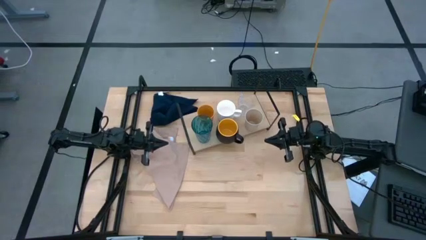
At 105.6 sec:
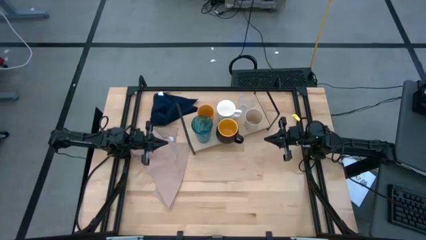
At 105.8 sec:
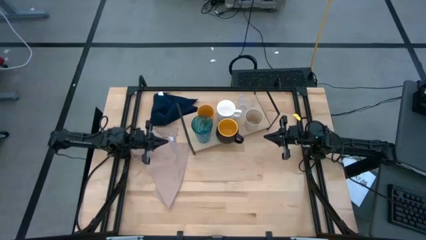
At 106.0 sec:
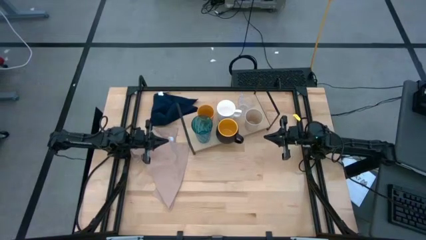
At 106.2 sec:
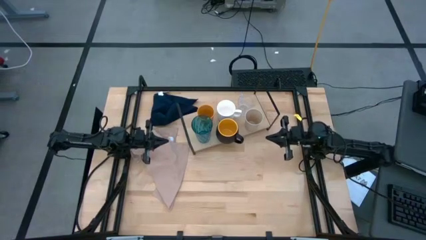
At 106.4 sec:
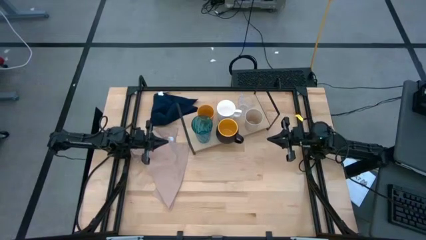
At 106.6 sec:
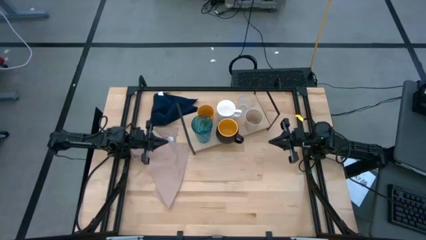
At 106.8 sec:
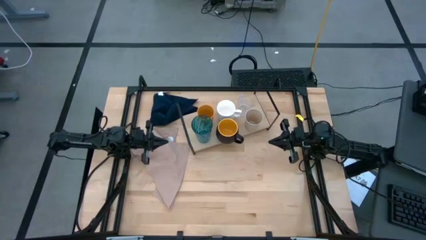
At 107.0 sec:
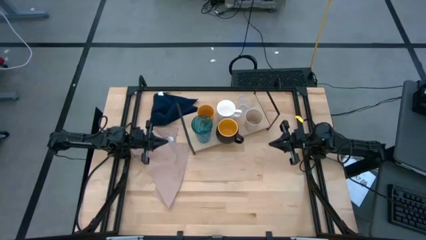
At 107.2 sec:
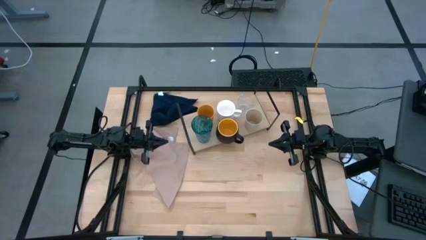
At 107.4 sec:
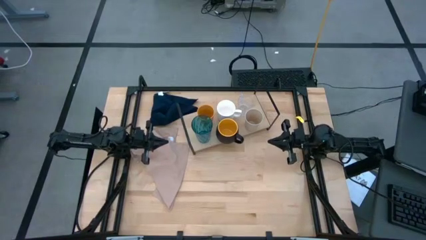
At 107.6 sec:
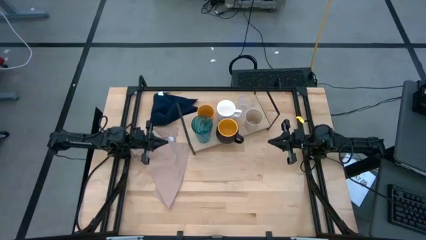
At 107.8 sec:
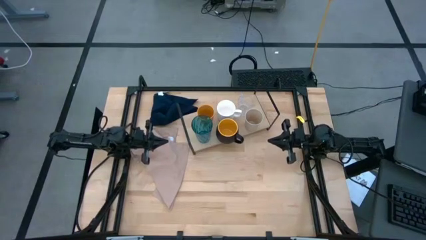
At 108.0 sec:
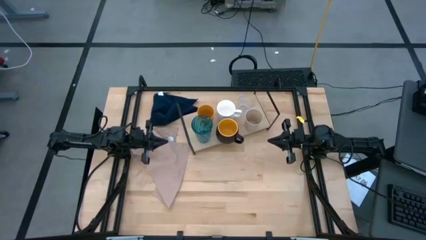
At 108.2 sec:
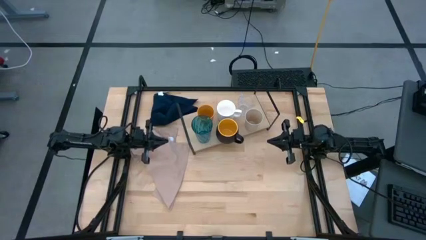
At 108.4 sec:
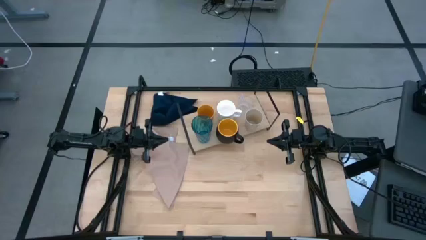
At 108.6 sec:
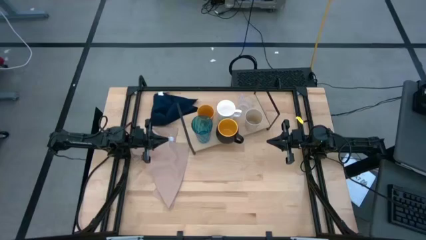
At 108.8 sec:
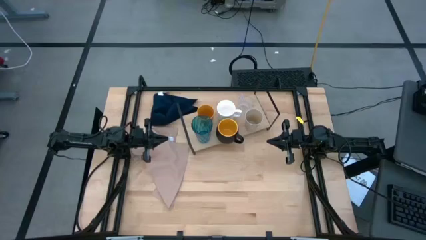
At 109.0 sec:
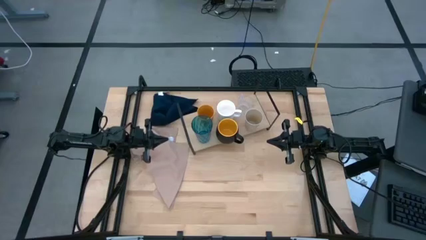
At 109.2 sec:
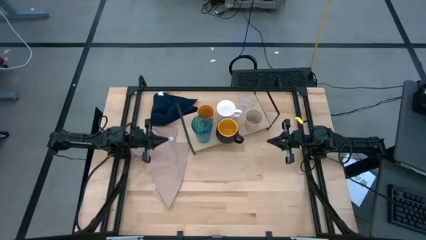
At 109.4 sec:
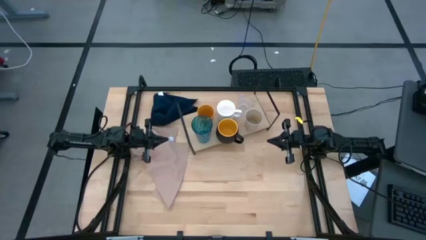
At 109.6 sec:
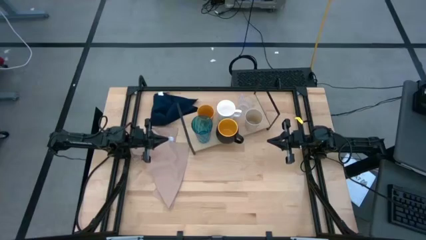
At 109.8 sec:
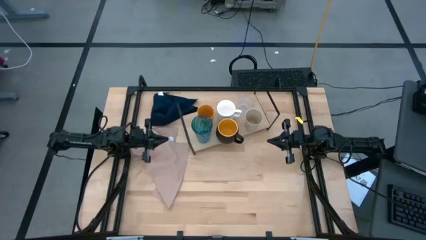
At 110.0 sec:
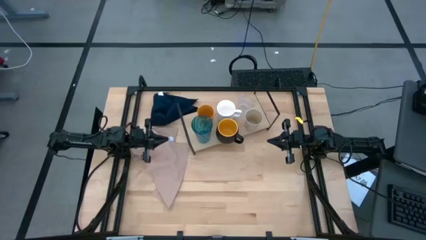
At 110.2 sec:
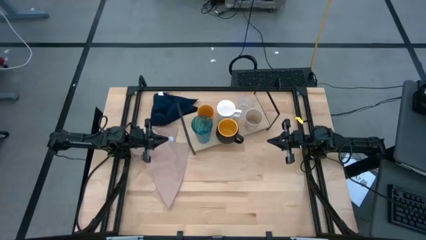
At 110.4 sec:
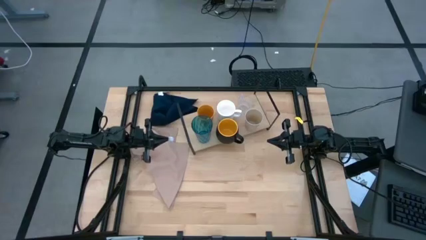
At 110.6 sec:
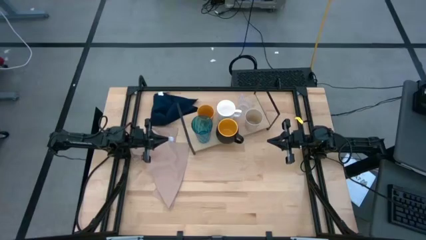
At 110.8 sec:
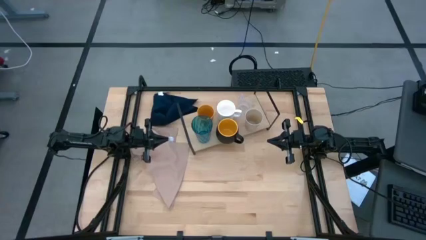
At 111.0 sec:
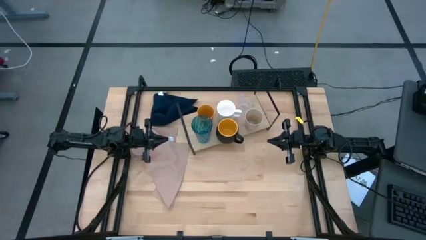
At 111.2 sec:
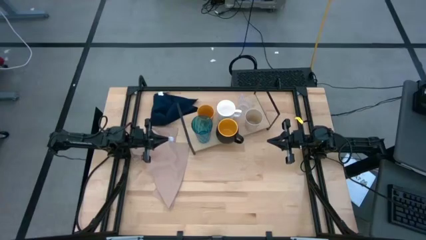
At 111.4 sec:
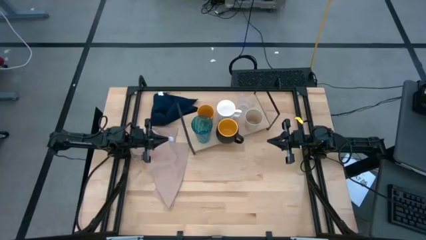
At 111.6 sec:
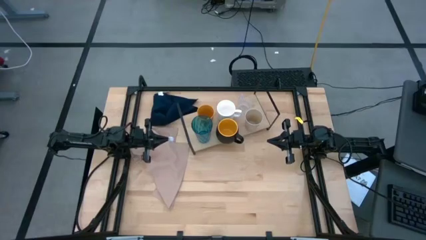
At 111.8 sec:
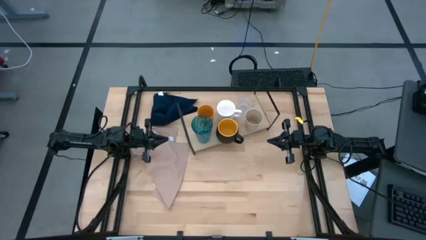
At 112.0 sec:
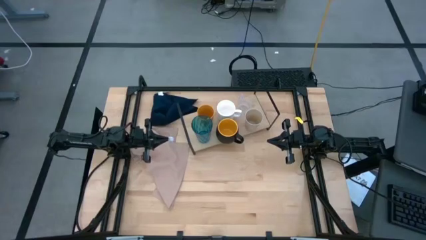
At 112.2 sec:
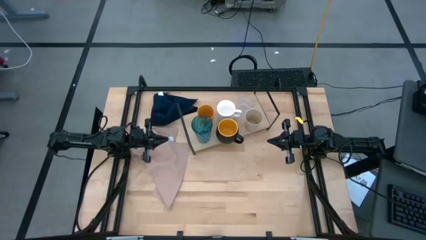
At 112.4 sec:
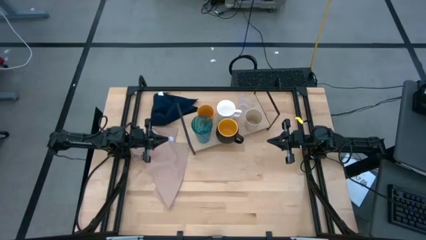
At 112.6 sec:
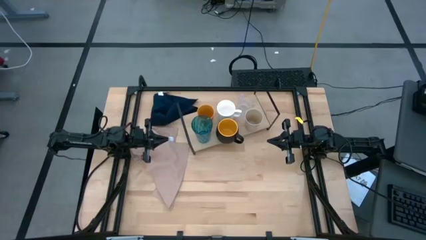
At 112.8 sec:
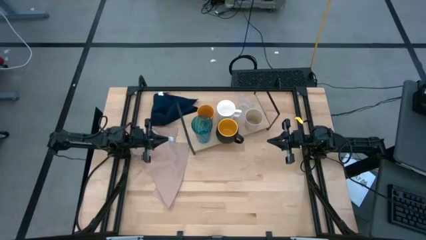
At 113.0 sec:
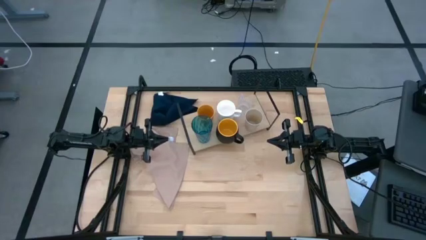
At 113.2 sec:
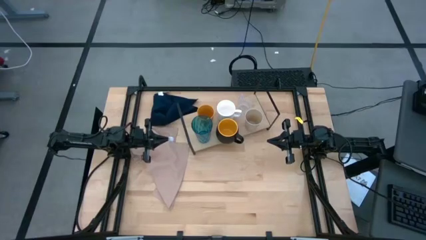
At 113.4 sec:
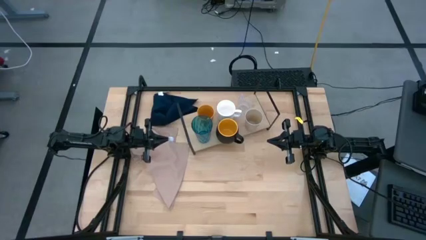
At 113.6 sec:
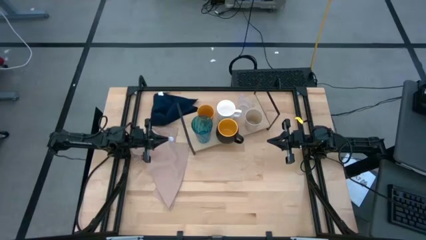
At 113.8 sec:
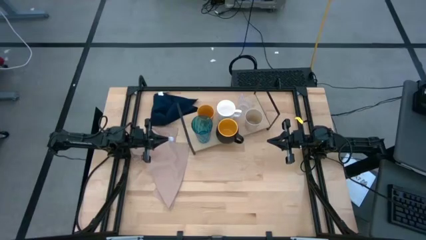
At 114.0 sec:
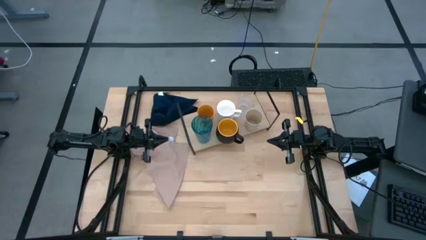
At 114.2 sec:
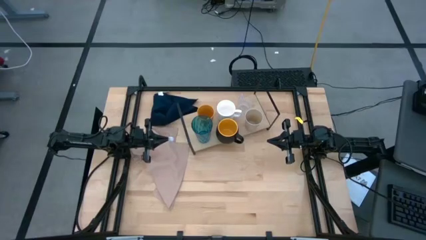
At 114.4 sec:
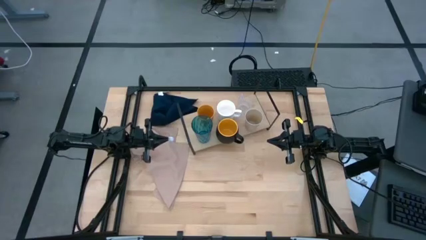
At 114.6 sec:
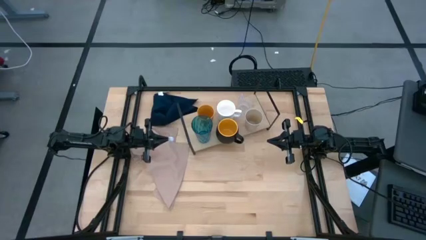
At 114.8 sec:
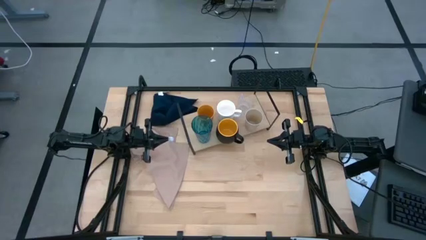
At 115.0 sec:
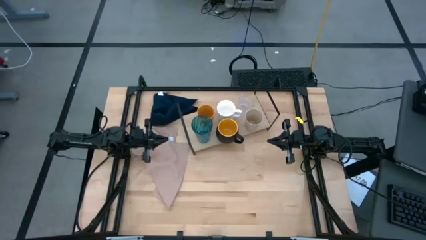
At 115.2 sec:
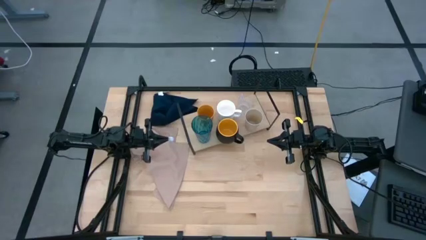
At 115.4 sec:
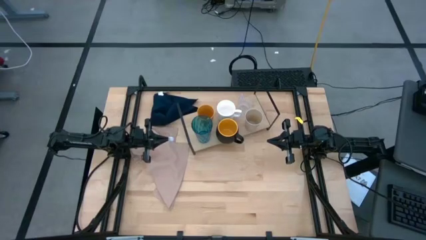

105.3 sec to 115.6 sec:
Task: Stack small to large cups/mugs on shelf
Return to Home Position
